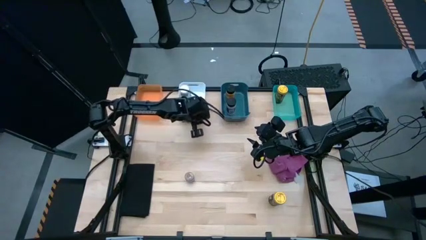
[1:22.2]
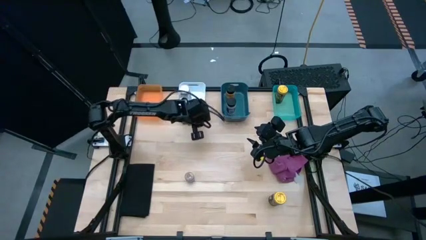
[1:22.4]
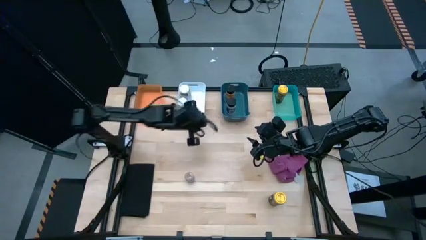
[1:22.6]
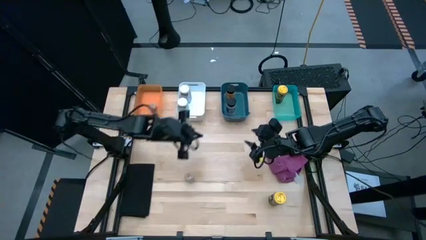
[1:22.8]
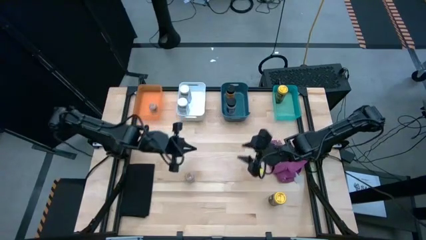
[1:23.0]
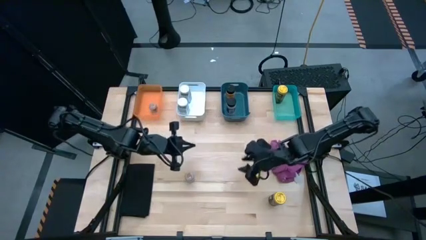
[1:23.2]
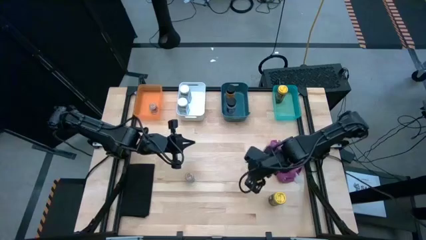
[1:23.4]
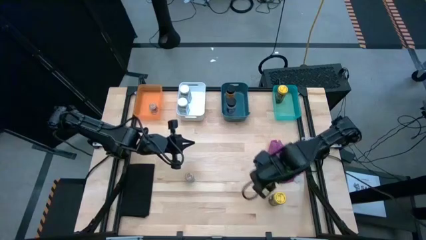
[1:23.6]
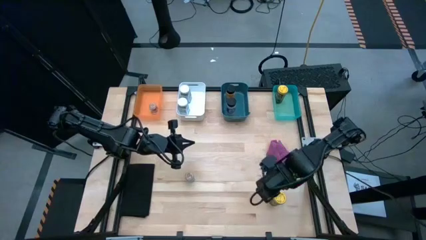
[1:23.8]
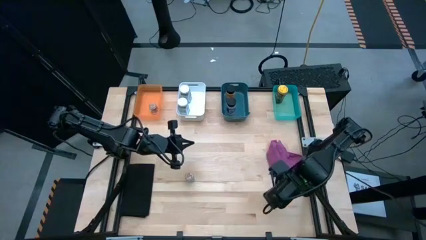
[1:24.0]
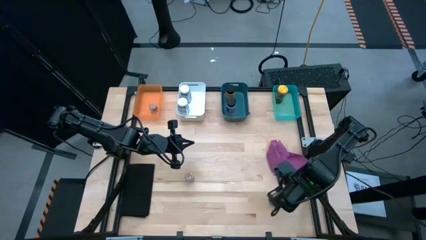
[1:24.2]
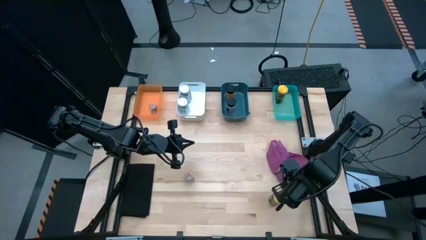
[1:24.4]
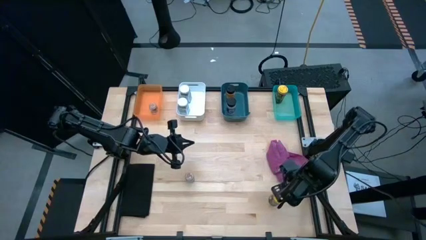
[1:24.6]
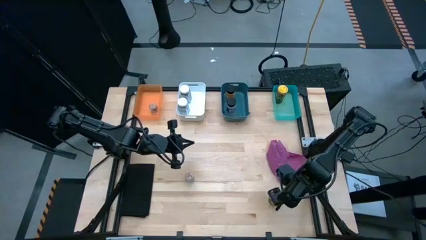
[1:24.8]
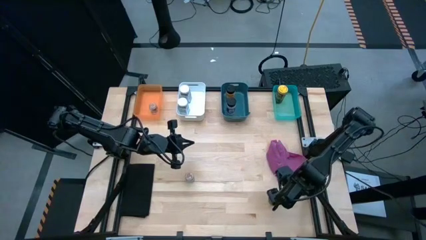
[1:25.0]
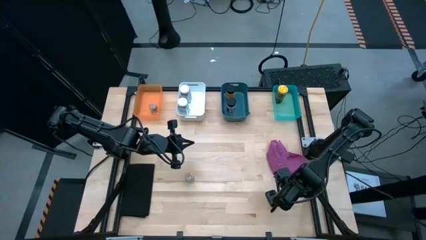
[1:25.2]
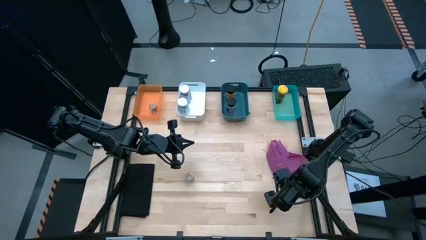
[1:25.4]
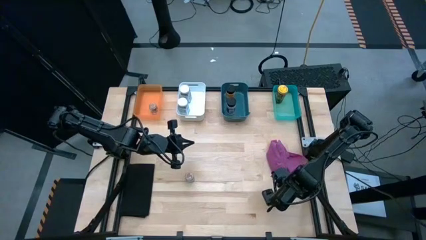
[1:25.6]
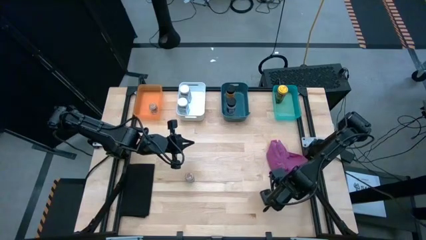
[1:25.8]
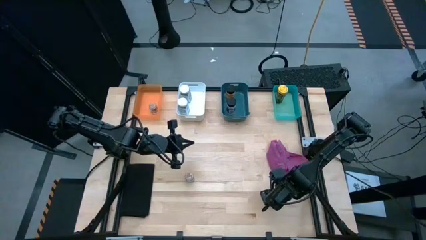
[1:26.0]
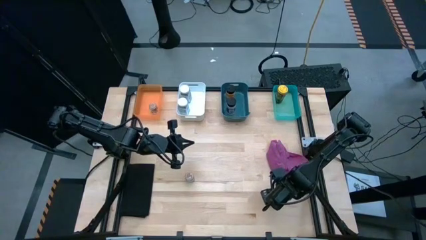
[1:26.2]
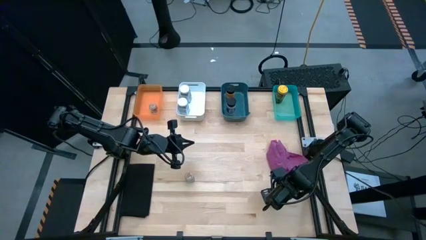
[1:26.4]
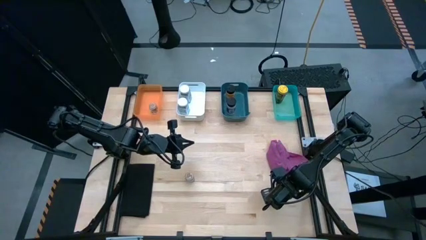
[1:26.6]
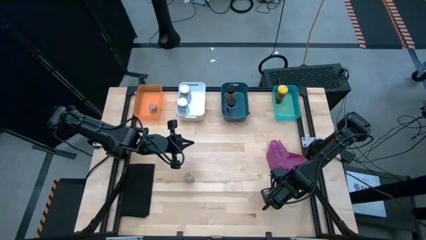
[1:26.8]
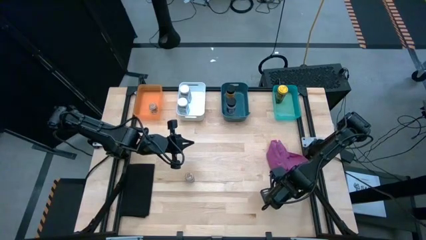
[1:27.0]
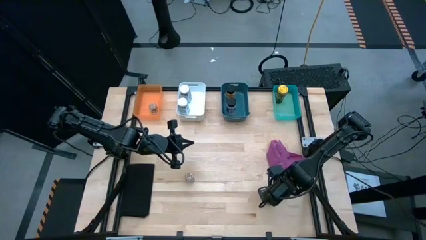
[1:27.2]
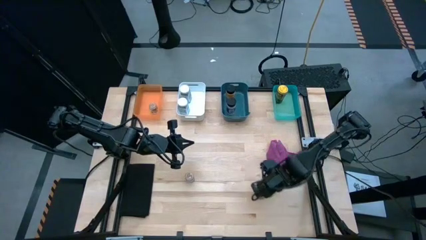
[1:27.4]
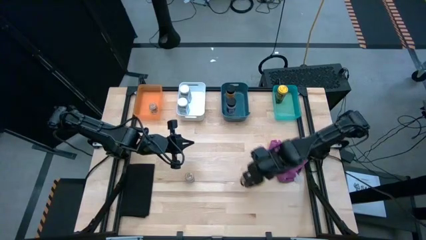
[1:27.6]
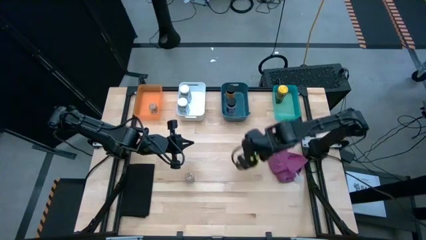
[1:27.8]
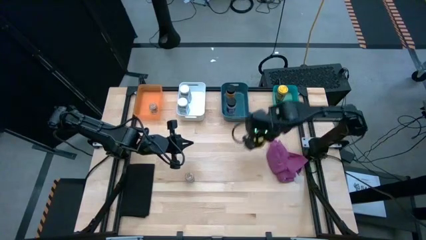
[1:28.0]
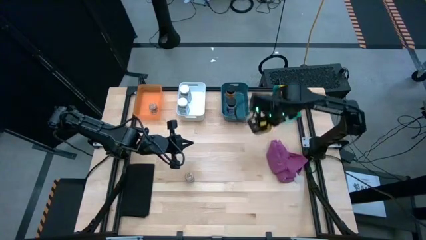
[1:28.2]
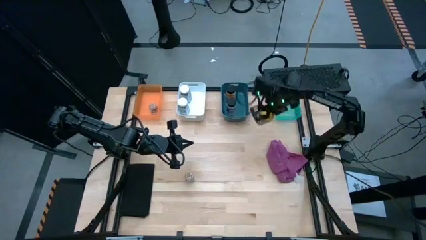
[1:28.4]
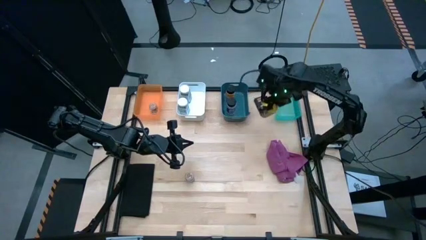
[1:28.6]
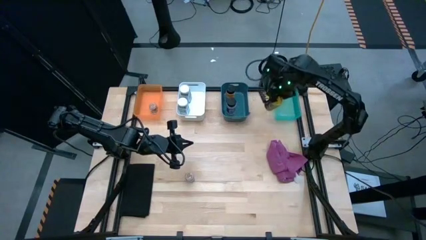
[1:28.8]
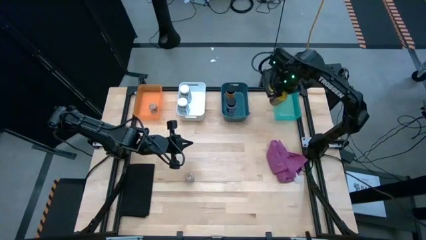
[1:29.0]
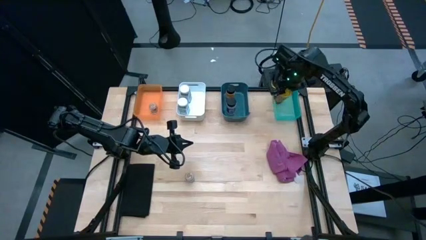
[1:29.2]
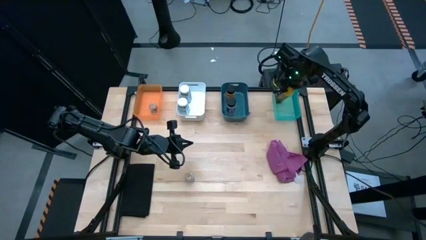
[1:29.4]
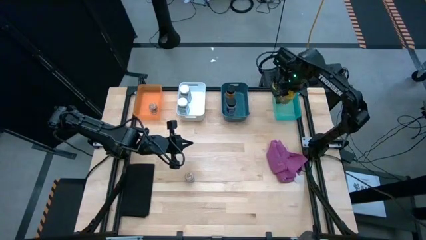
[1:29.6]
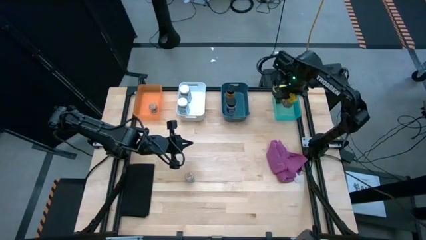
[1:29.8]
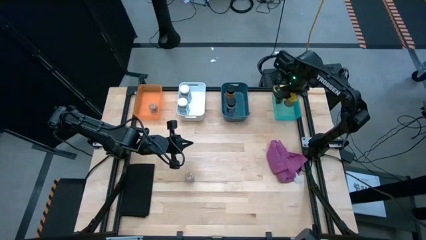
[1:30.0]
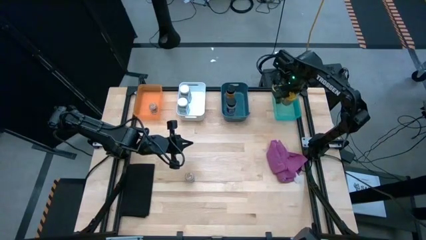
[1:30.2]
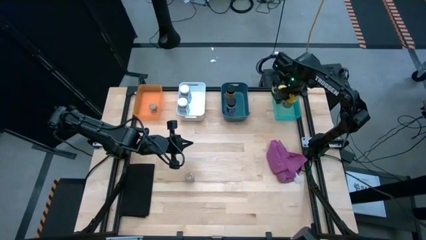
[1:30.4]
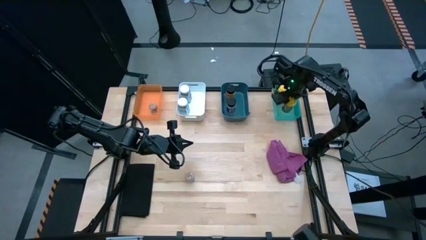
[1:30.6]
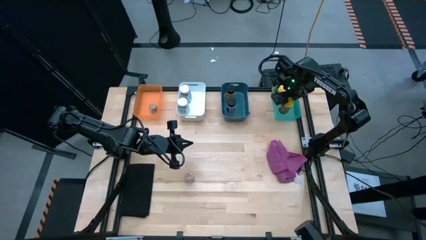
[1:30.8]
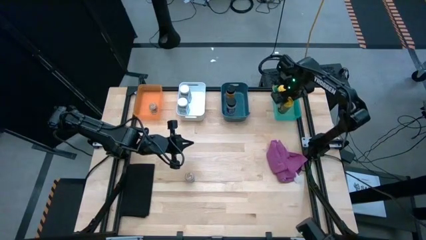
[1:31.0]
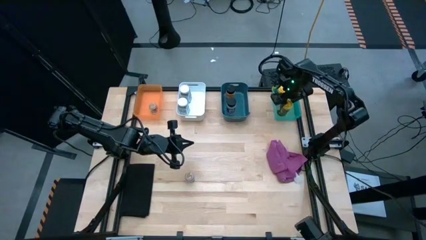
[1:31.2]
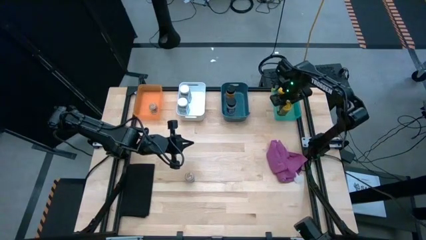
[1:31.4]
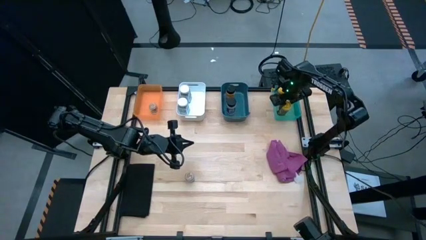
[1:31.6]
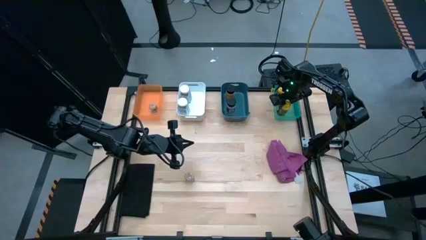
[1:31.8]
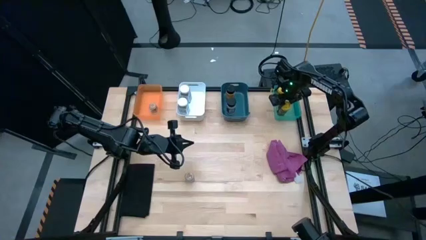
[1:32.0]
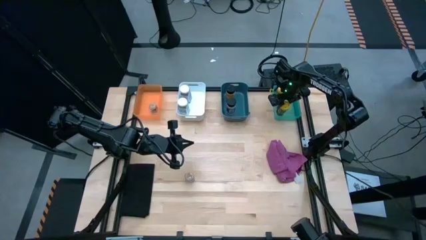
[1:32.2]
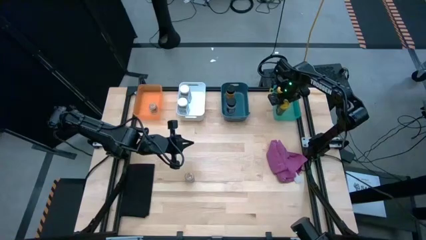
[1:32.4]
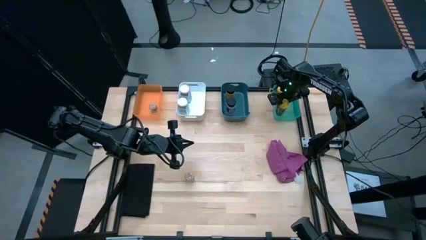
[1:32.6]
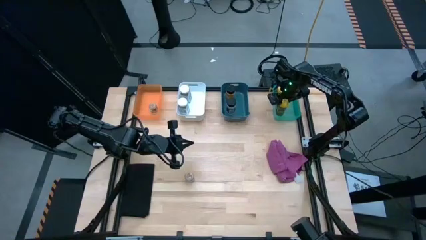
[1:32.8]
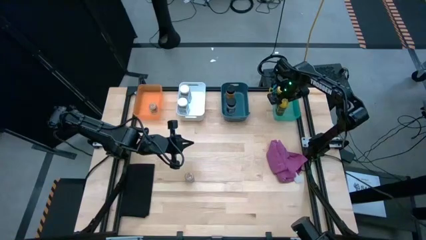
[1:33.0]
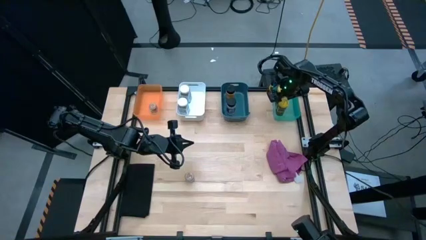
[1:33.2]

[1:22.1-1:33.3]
Task: Sort spices by type
Put the yellow seasoning bottle into the blue bin

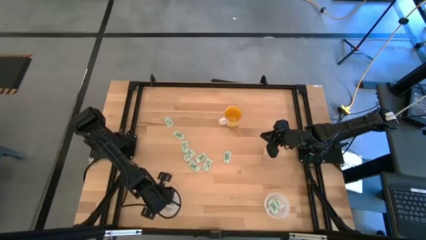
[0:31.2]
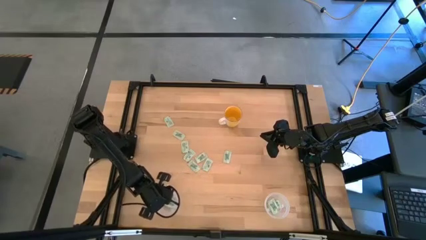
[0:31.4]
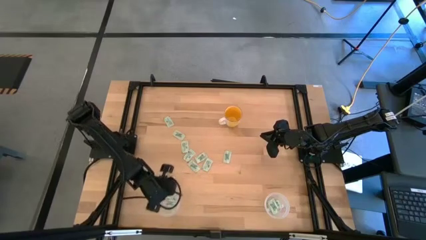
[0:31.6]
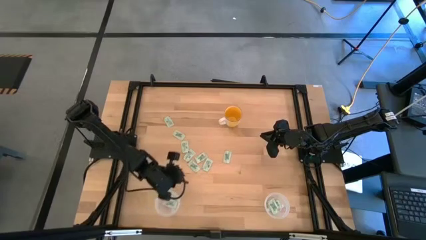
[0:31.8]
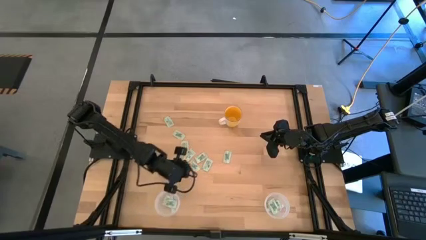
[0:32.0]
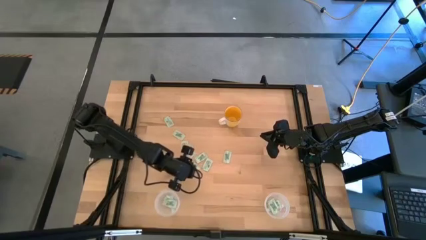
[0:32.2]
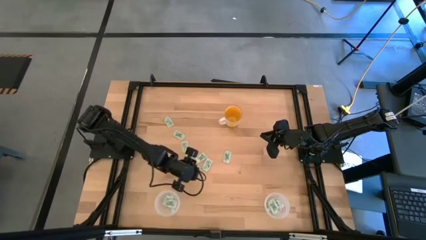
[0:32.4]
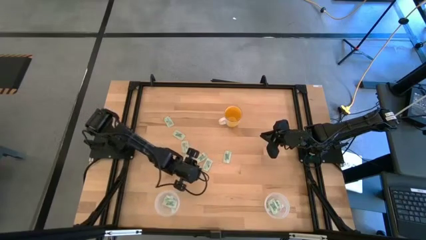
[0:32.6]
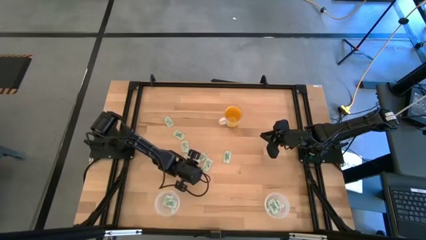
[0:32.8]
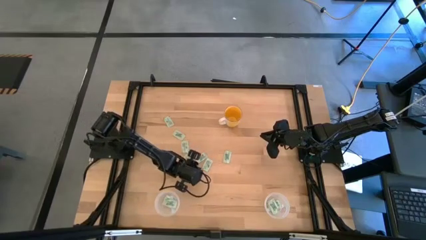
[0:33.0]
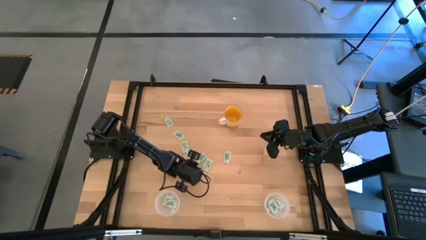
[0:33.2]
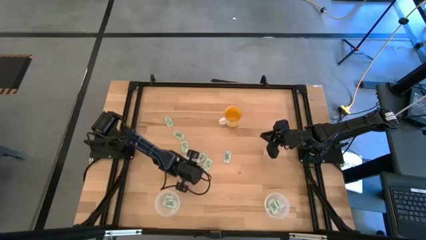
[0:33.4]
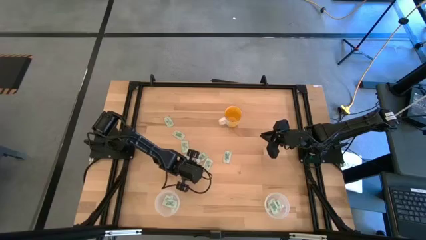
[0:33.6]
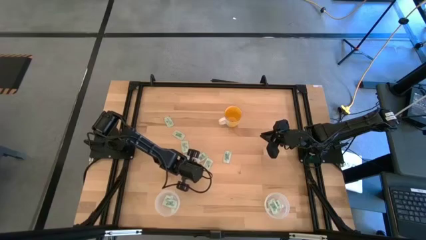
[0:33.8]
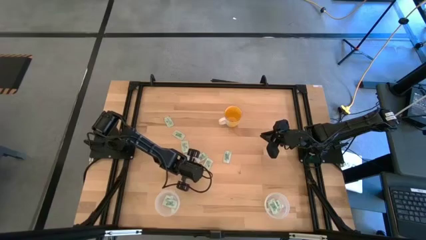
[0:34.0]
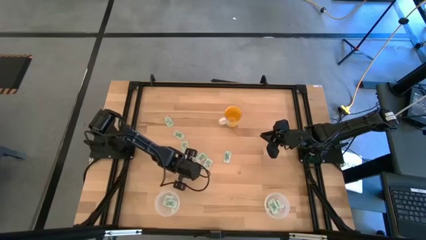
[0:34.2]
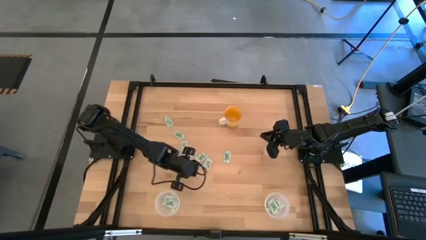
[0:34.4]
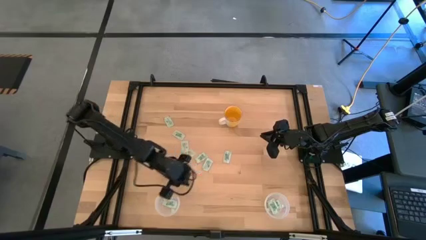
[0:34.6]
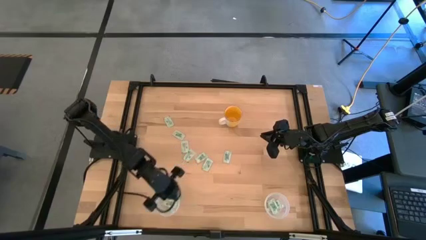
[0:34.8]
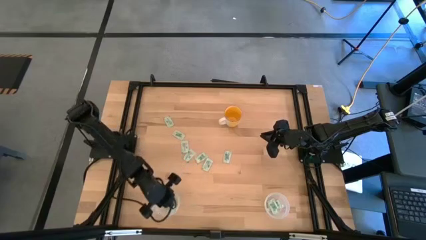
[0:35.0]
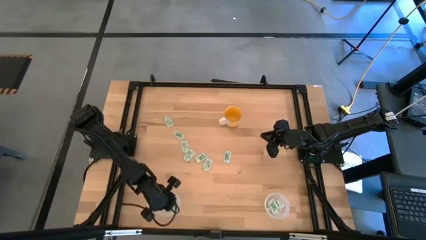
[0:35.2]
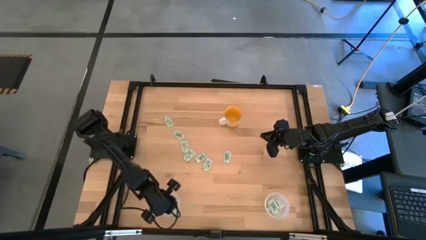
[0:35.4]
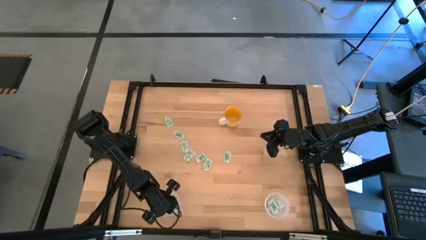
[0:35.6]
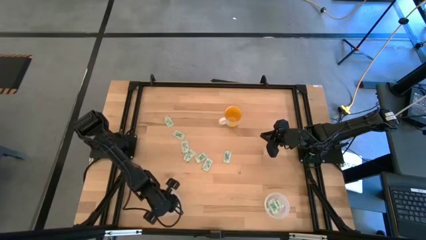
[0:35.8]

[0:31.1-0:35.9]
Task: Pick and place items into bin
Put the stevia packet into the left transparent bin
